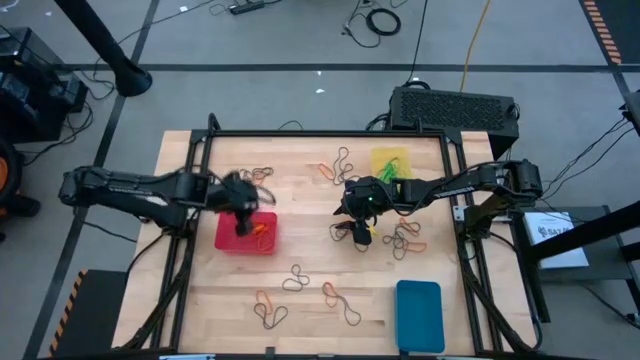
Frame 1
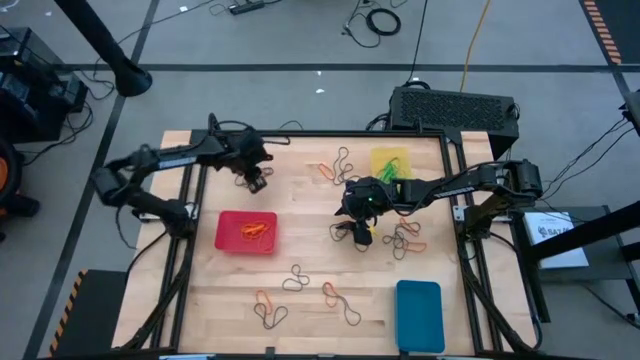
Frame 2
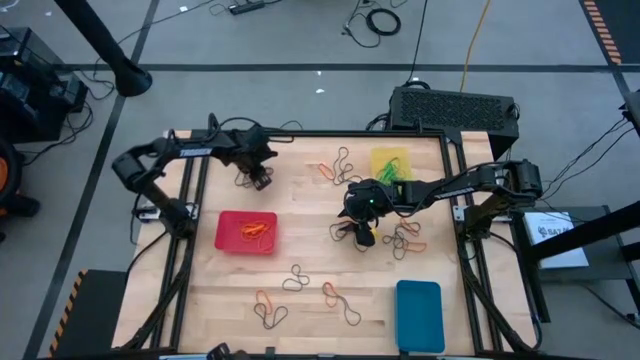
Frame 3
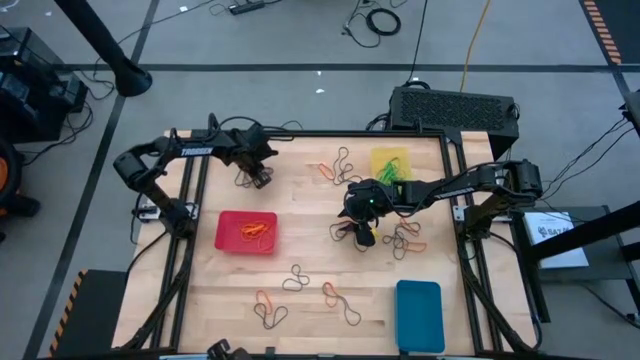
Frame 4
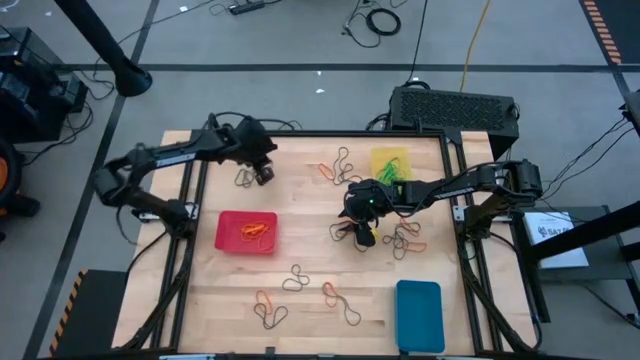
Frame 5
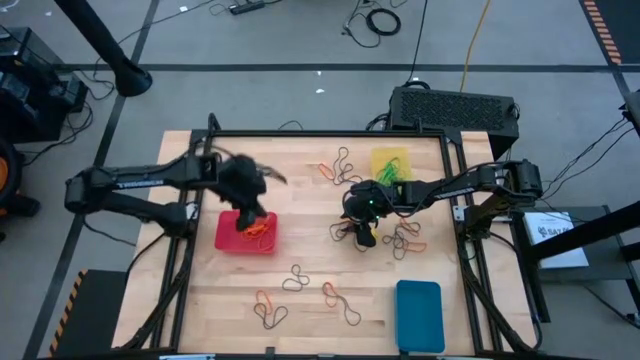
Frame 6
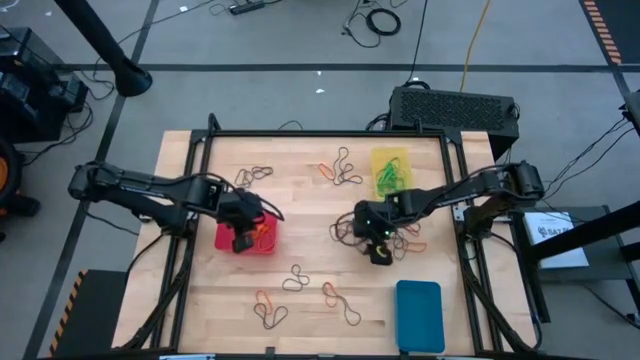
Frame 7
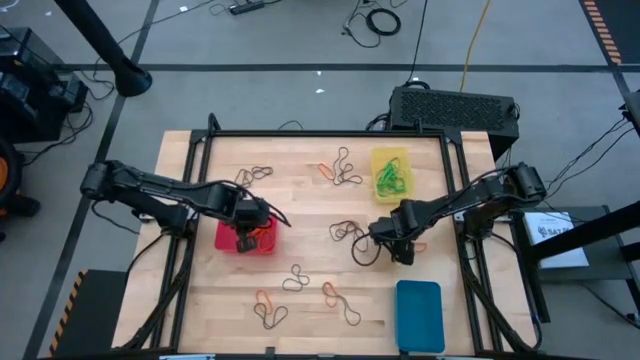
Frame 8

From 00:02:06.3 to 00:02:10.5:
Task: Sort rubber bands into baskets
Put the orange rubber band into the pink bin

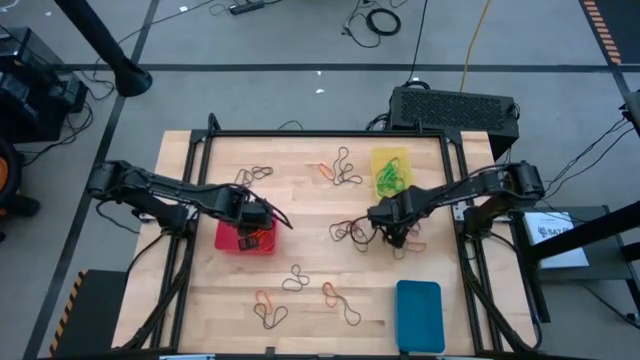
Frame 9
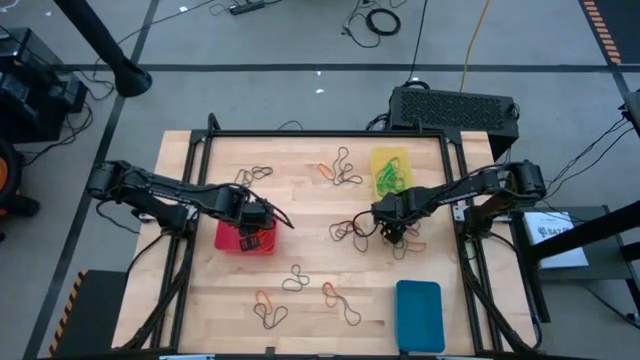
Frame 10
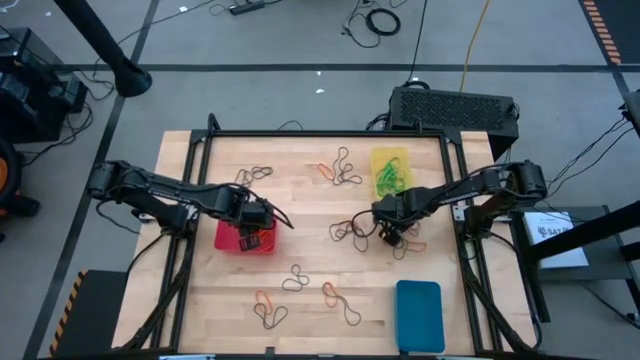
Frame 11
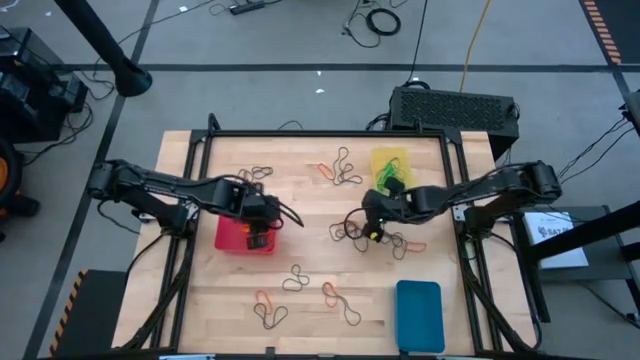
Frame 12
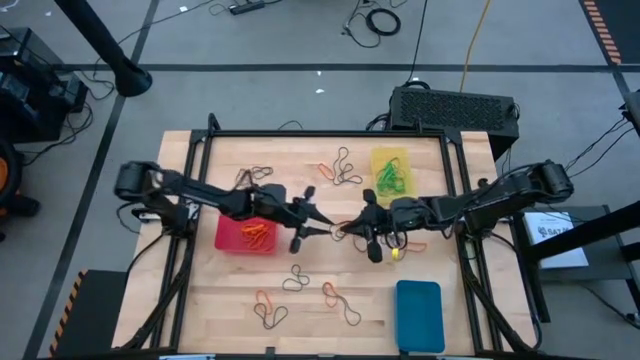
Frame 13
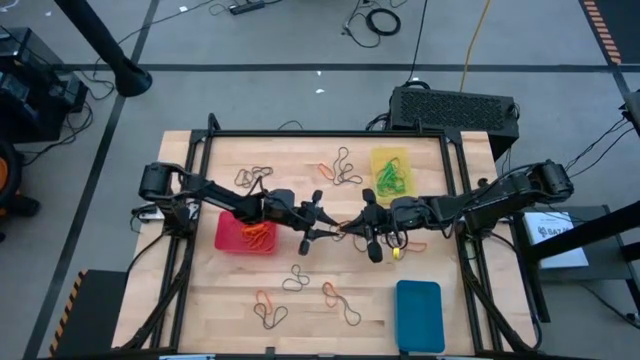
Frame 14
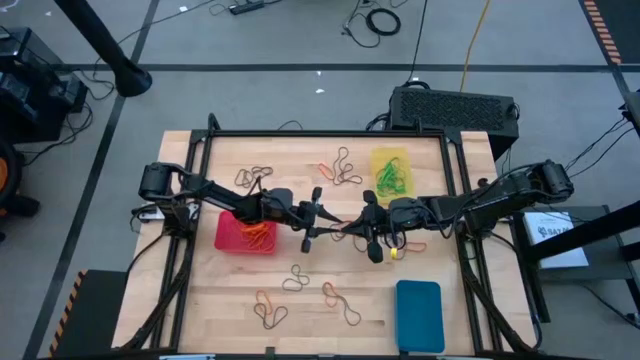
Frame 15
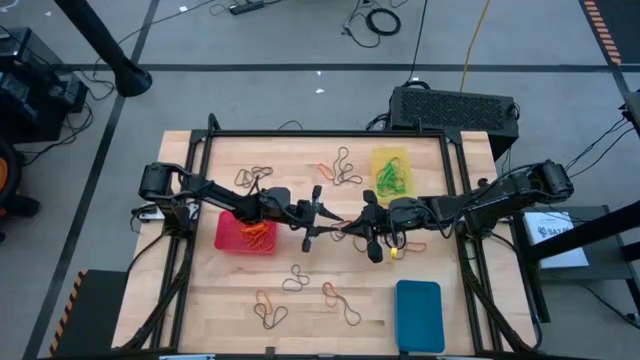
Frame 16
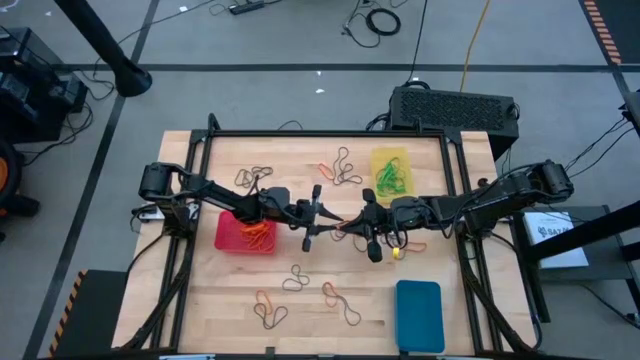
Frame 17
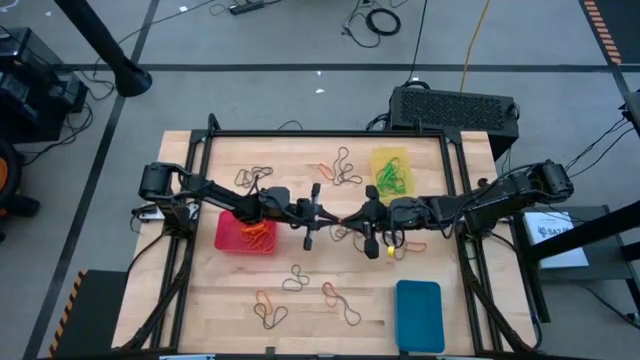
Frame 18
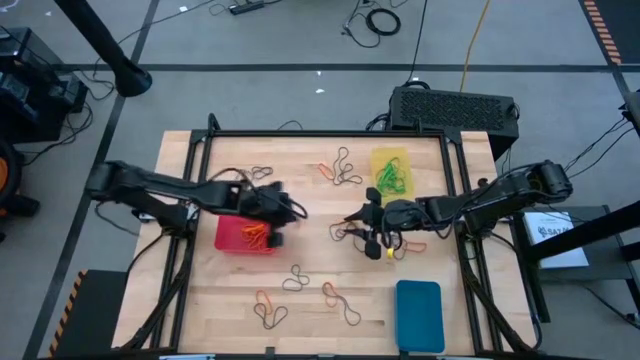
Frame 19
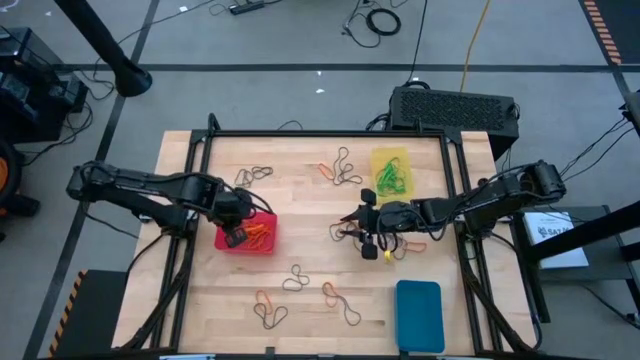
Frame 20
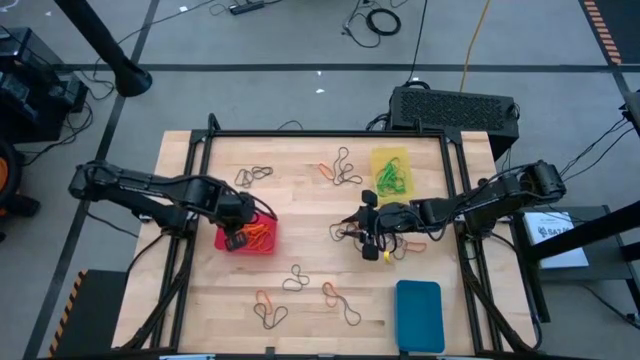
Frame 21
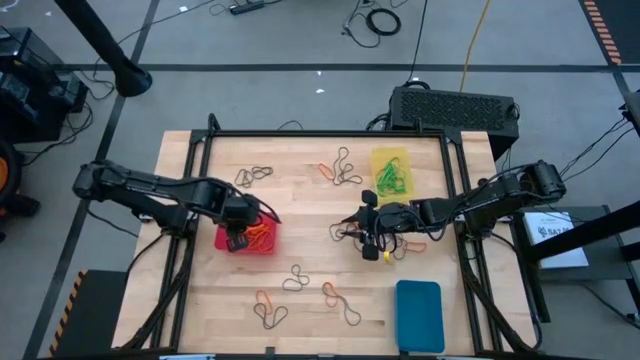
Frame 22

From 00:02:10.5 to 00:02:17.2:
Put the orange rubber band into the pink bin

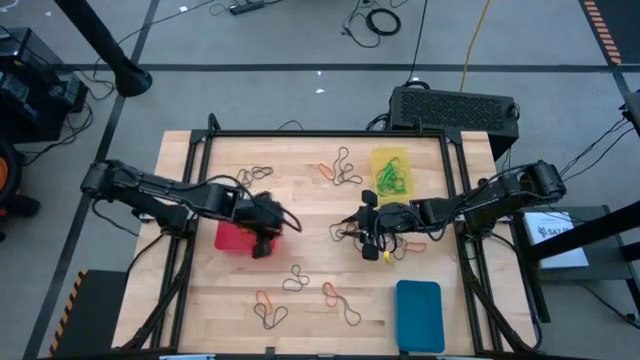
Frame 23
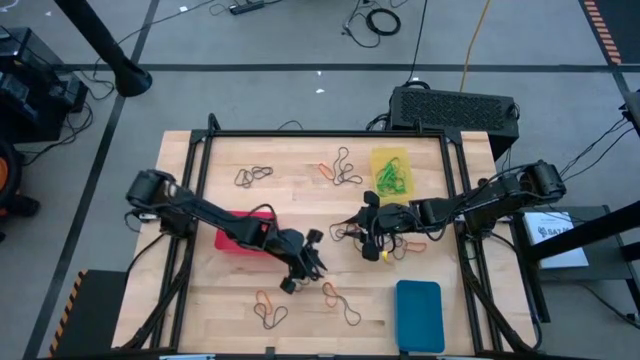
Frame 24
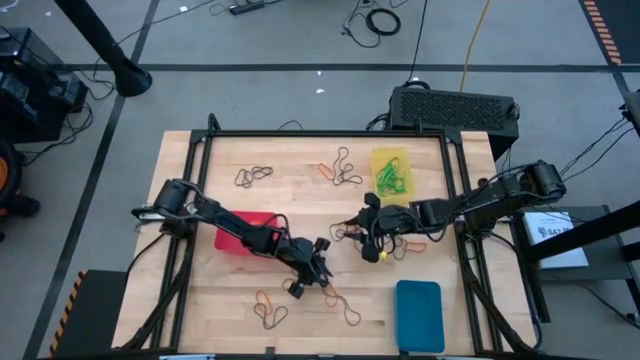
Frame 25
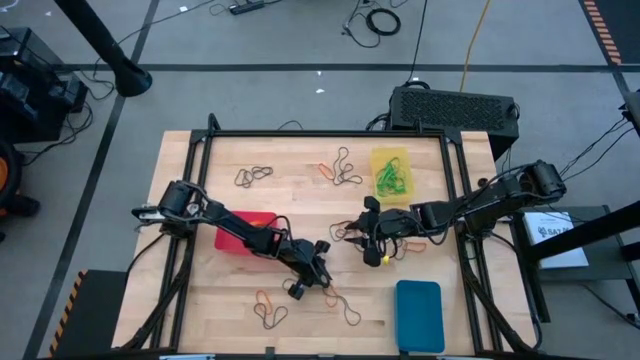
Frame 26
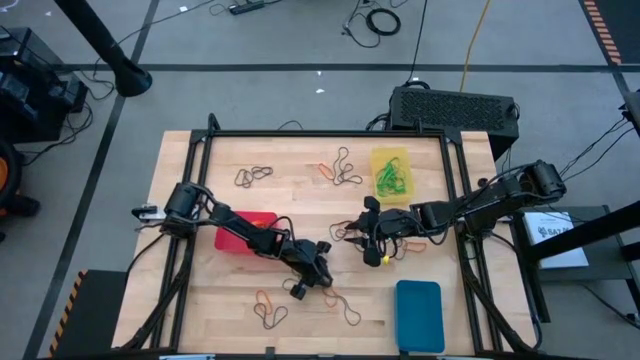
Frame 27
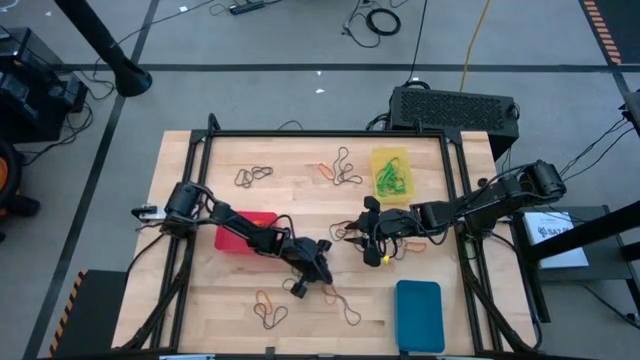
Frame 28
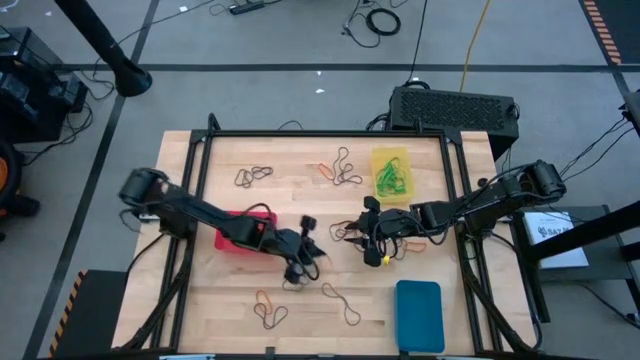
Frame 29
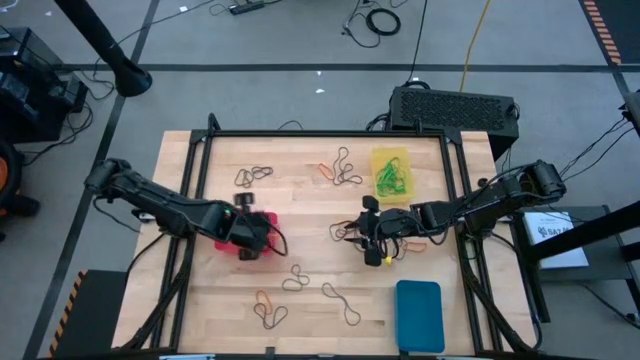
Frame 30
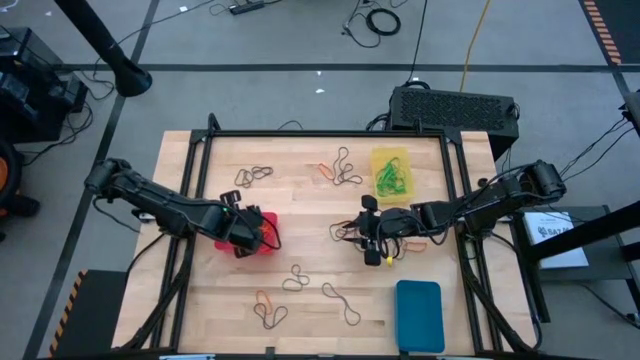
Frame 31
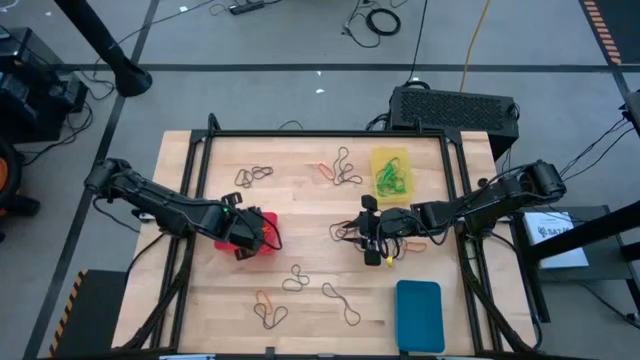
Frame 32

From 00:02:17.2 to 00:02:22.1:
Put the orange rubber band into the pink bin

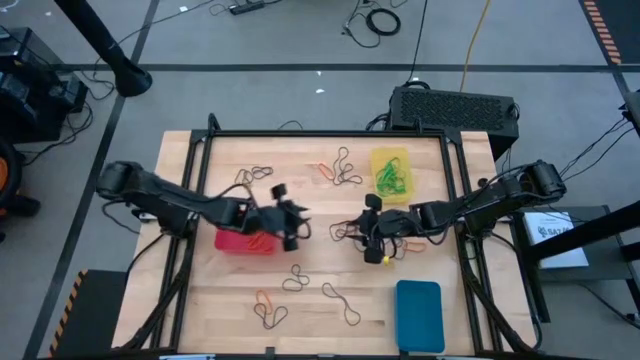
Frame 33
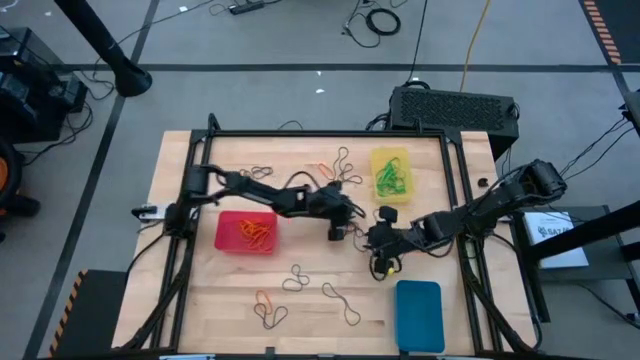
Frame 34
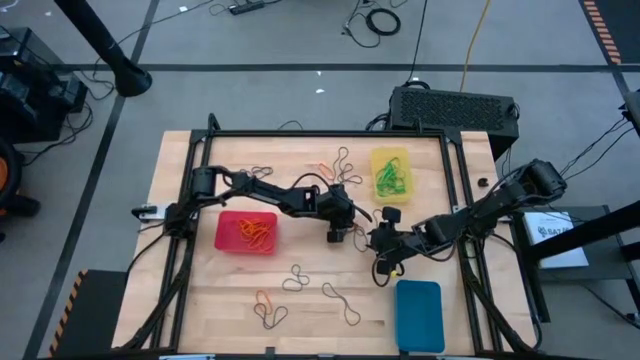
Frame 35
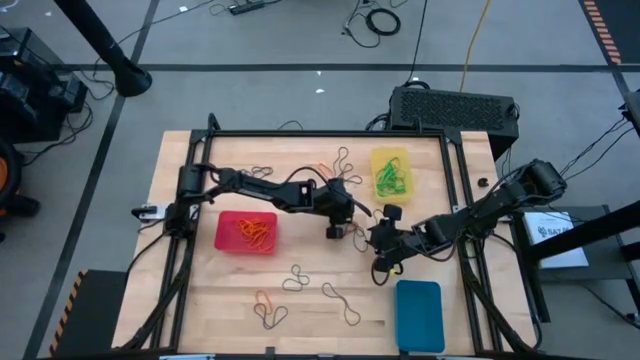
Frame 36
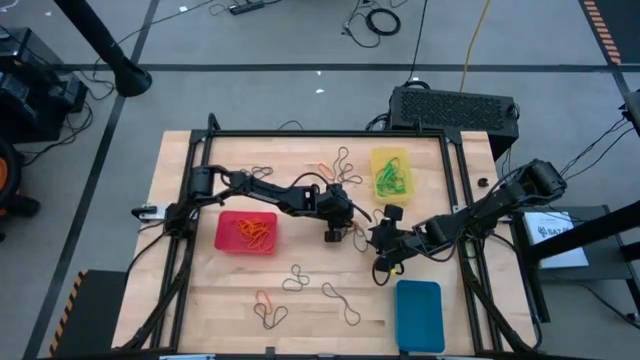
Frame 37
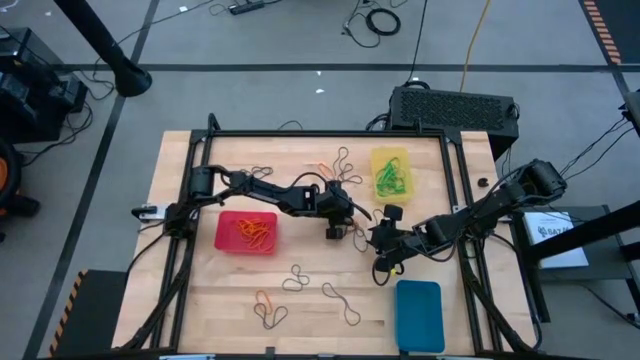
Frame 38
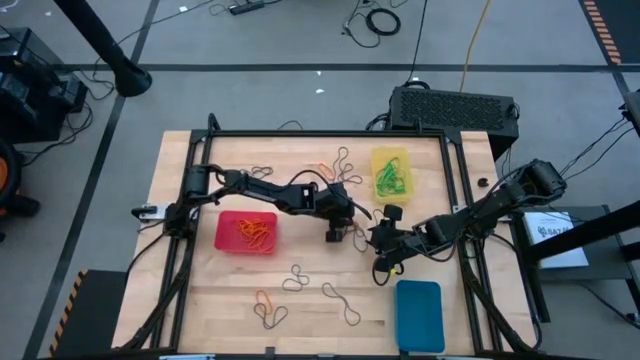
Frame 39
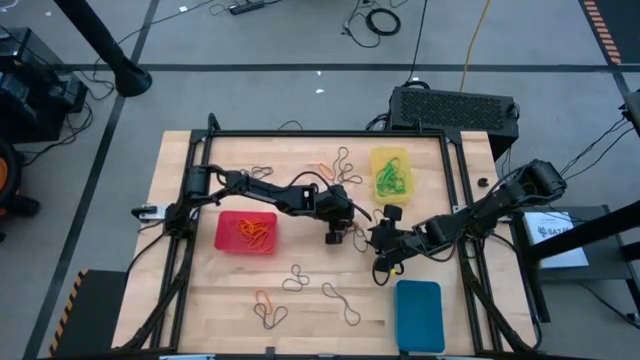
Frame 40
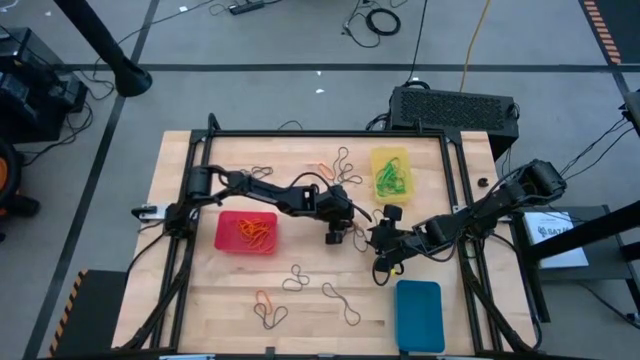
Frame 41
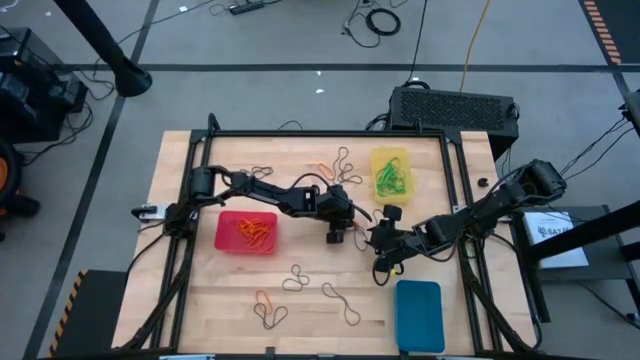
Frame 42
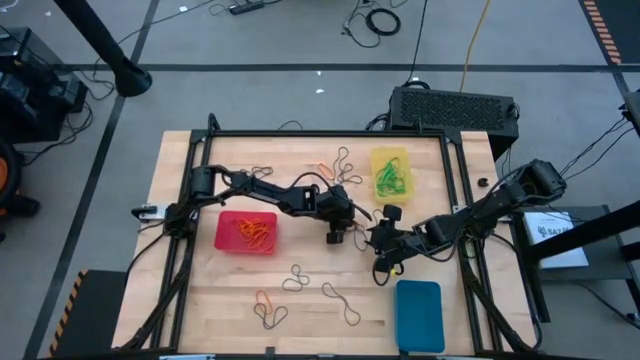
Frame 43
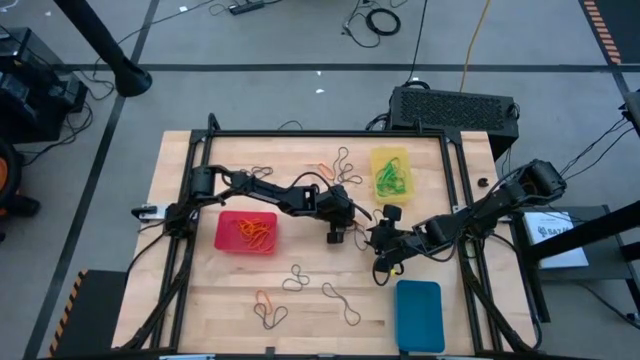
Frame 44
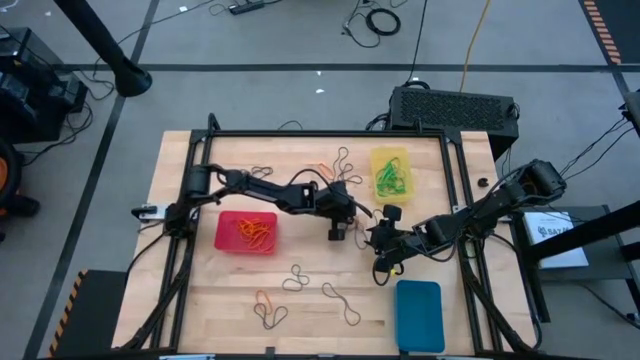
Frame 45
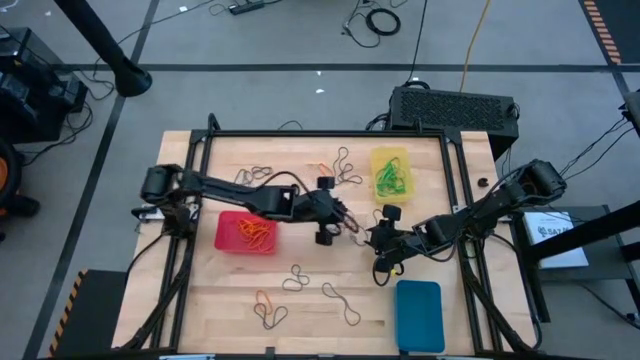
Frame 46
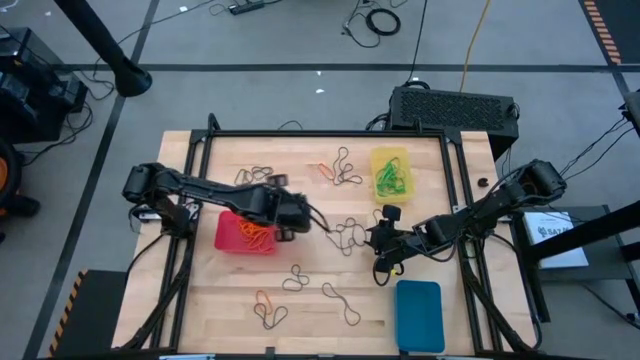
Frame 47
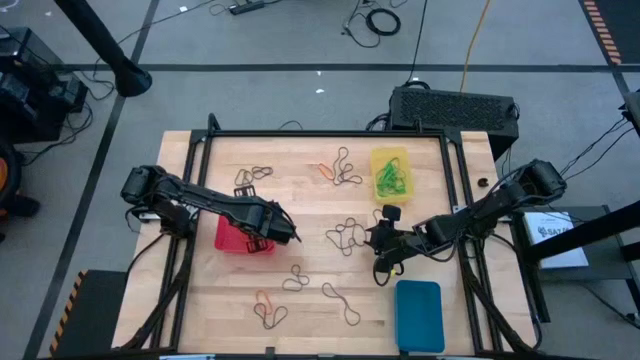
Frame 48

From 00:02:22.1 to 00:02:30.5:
Put the orange rubber band into the pink bin
